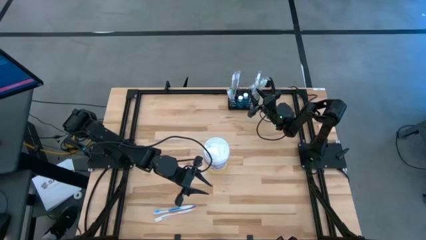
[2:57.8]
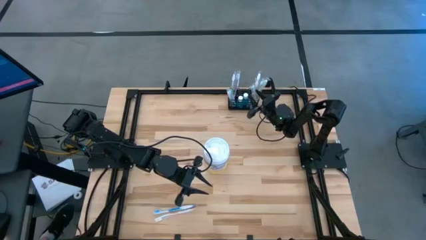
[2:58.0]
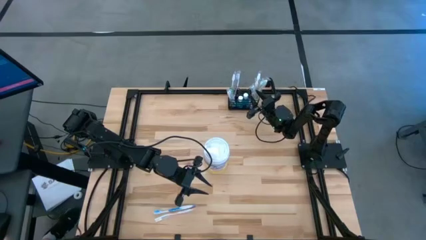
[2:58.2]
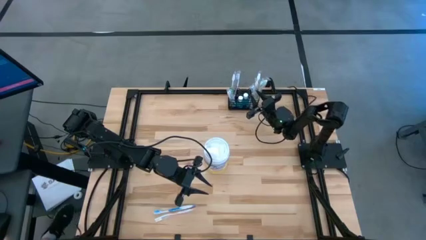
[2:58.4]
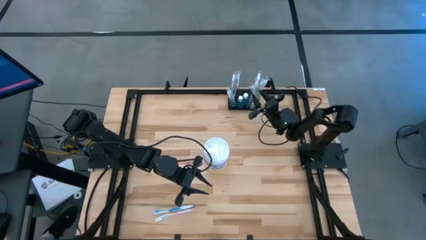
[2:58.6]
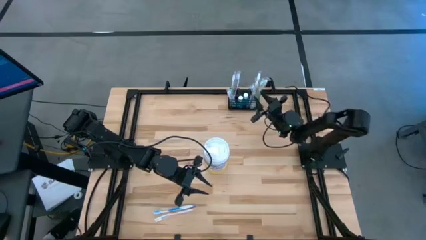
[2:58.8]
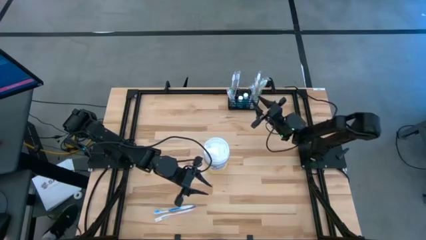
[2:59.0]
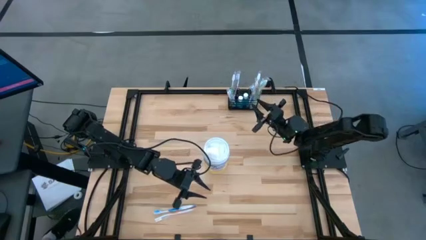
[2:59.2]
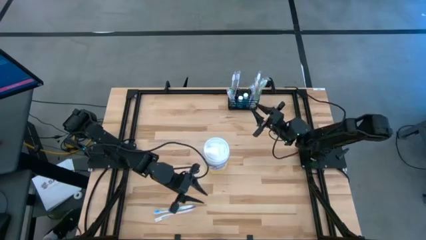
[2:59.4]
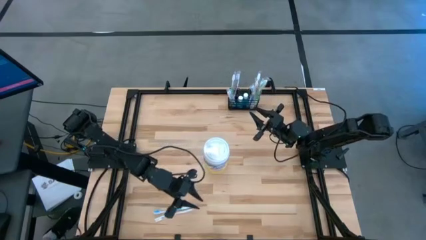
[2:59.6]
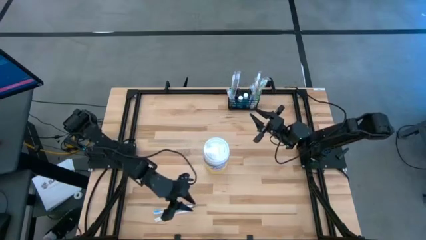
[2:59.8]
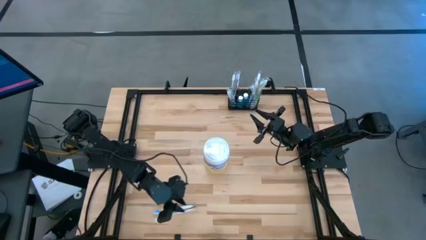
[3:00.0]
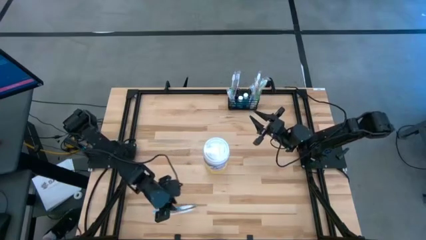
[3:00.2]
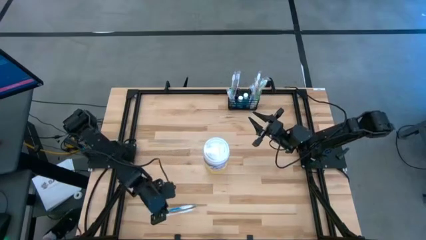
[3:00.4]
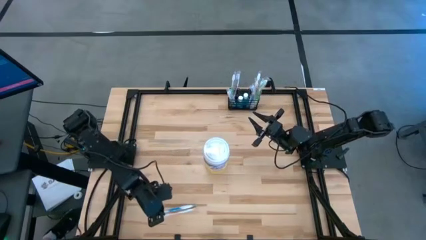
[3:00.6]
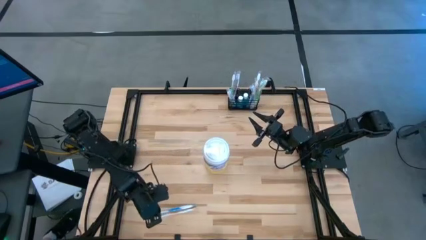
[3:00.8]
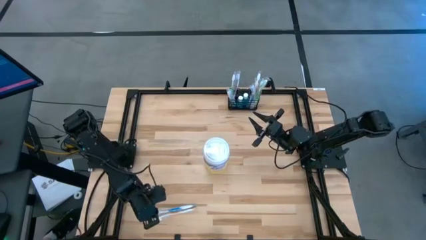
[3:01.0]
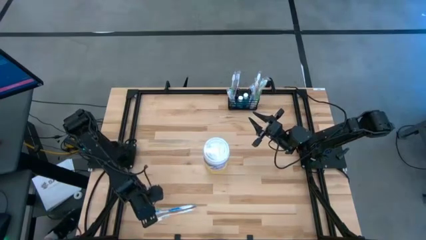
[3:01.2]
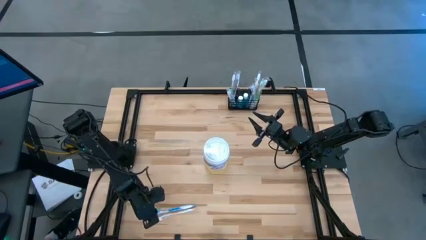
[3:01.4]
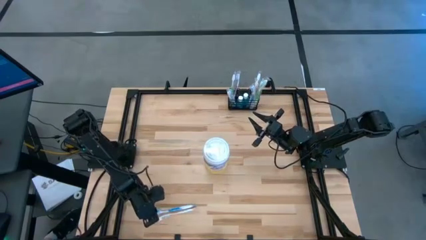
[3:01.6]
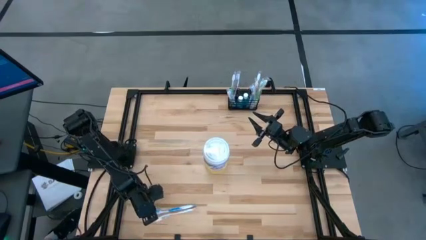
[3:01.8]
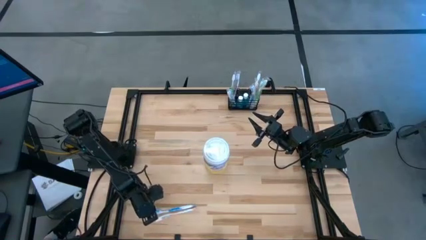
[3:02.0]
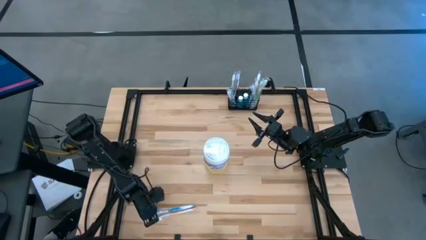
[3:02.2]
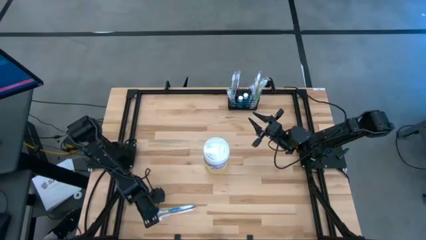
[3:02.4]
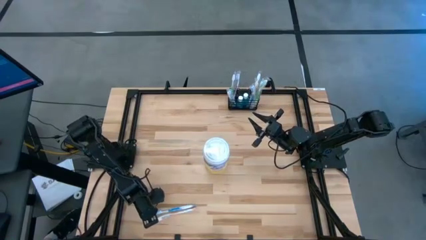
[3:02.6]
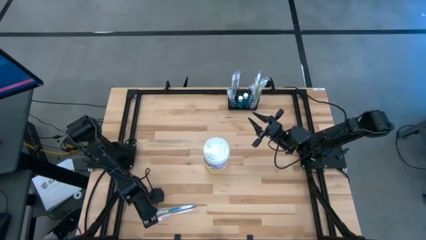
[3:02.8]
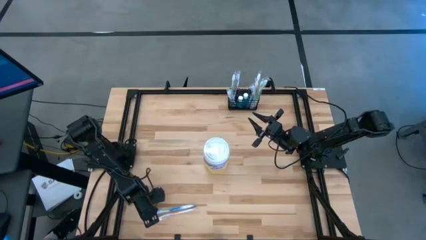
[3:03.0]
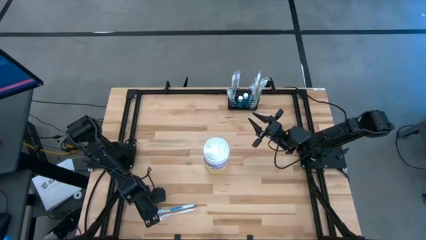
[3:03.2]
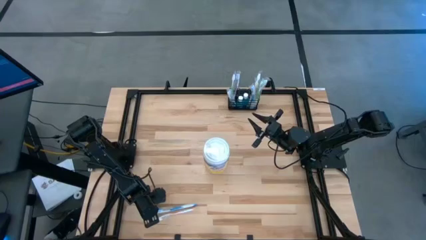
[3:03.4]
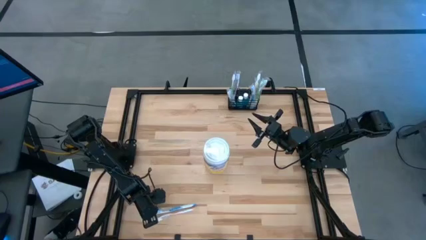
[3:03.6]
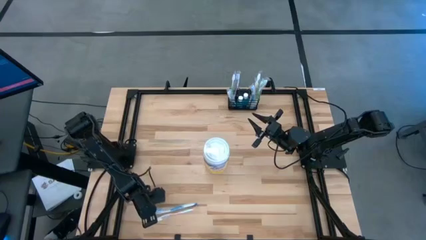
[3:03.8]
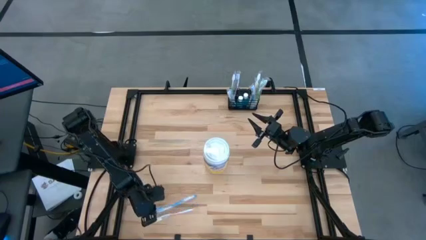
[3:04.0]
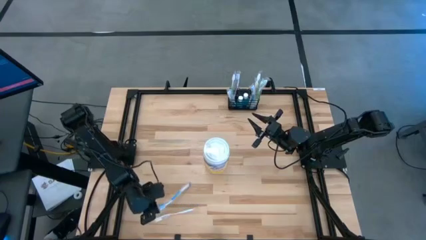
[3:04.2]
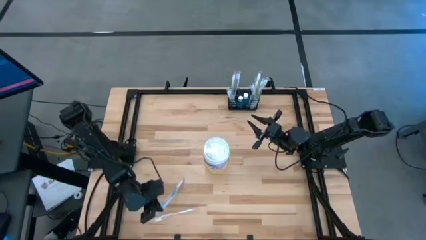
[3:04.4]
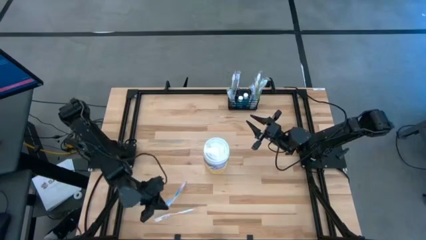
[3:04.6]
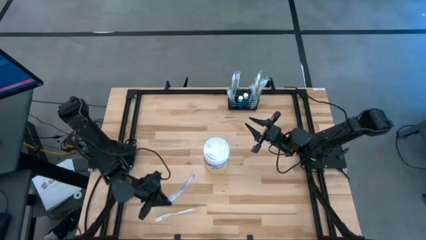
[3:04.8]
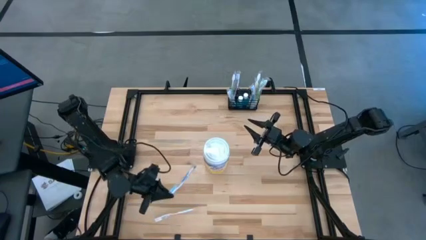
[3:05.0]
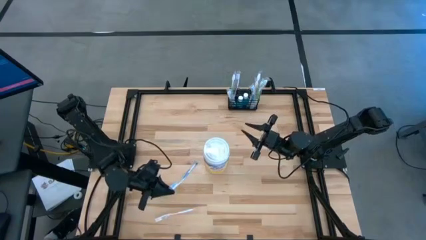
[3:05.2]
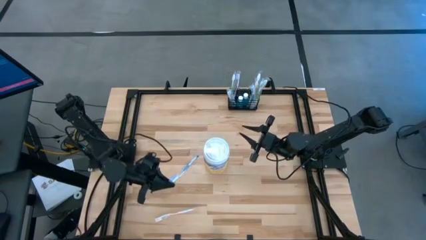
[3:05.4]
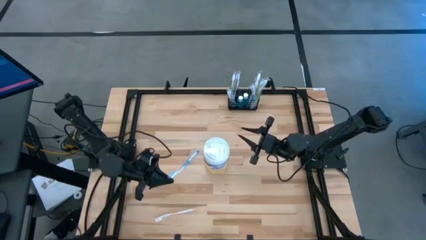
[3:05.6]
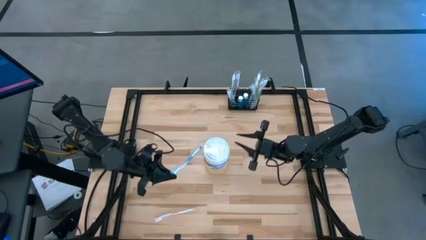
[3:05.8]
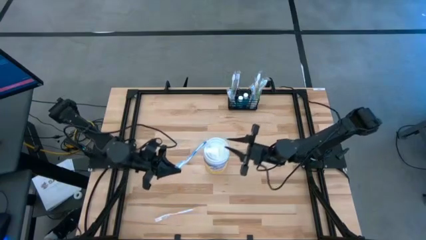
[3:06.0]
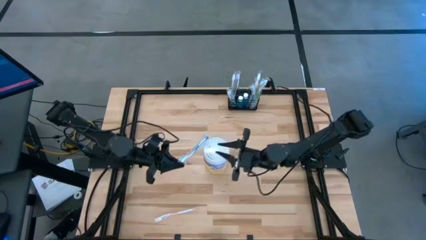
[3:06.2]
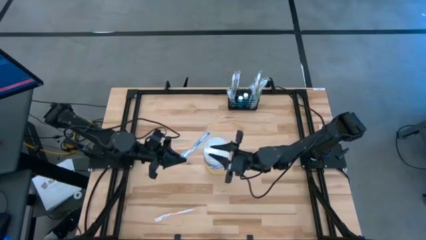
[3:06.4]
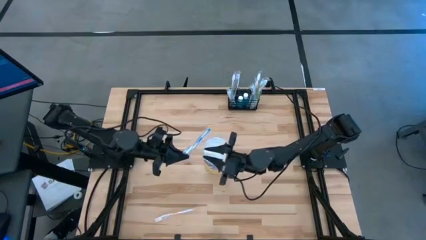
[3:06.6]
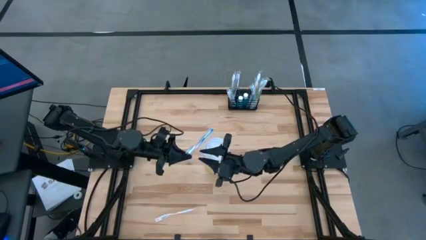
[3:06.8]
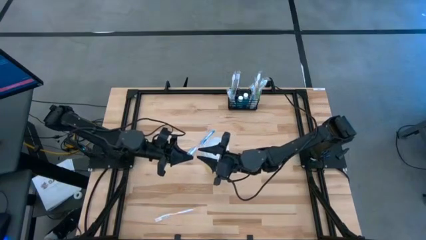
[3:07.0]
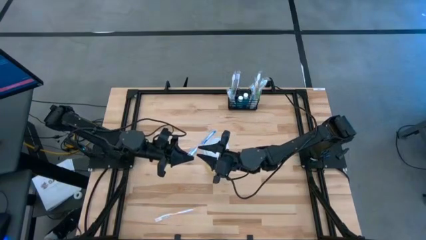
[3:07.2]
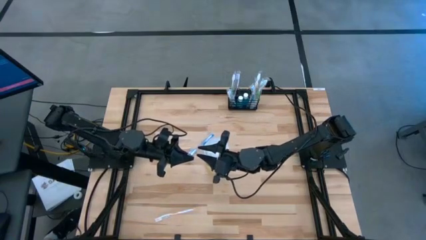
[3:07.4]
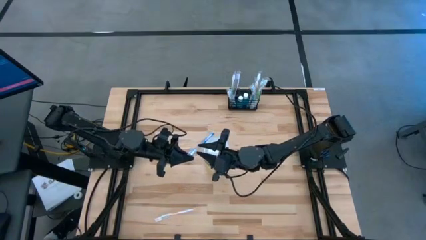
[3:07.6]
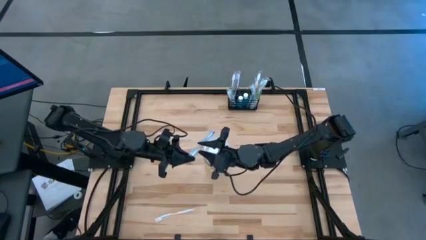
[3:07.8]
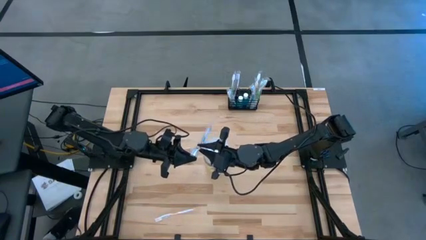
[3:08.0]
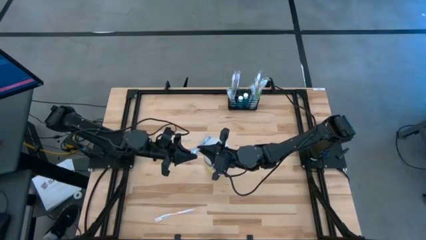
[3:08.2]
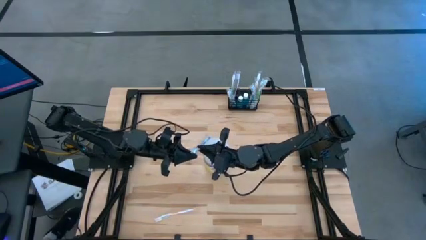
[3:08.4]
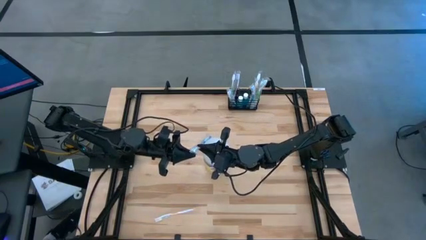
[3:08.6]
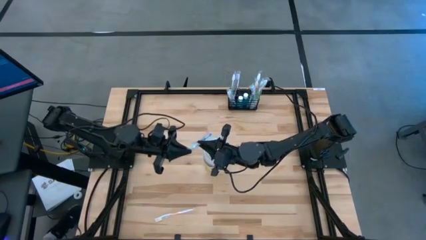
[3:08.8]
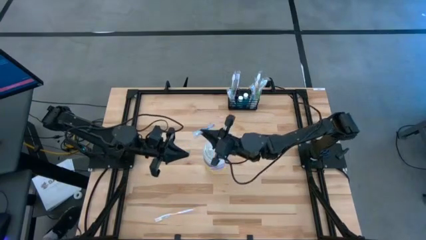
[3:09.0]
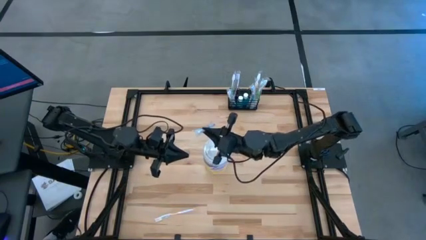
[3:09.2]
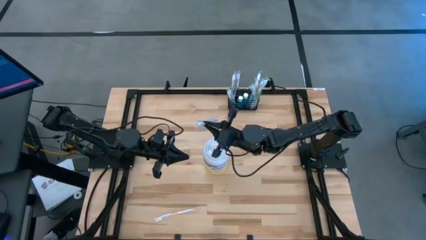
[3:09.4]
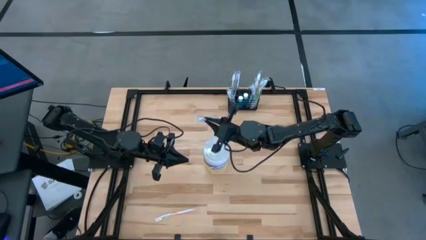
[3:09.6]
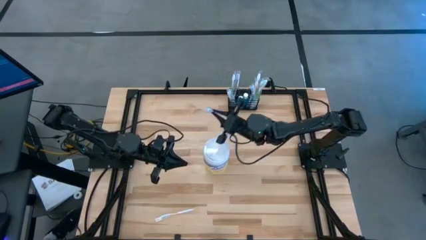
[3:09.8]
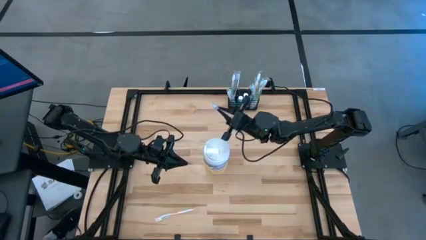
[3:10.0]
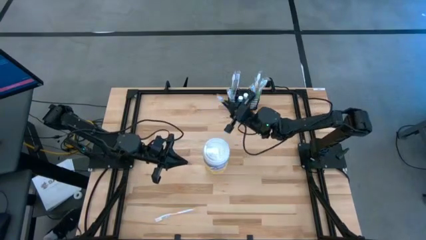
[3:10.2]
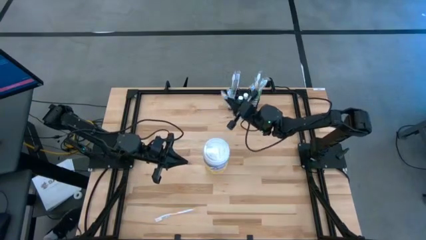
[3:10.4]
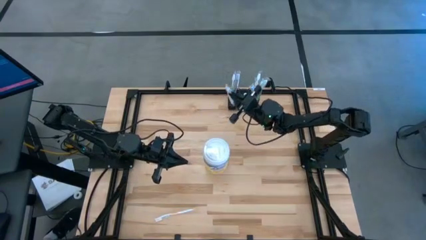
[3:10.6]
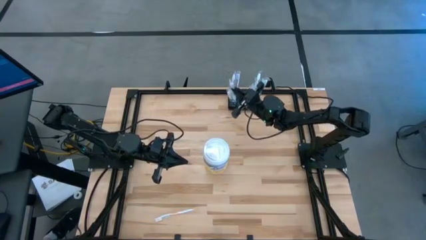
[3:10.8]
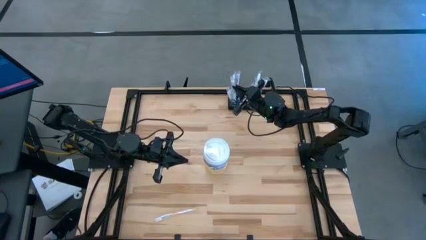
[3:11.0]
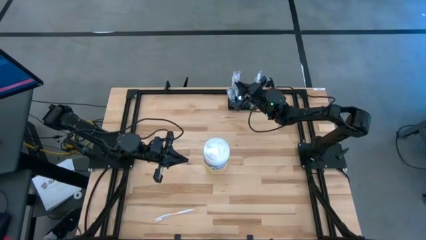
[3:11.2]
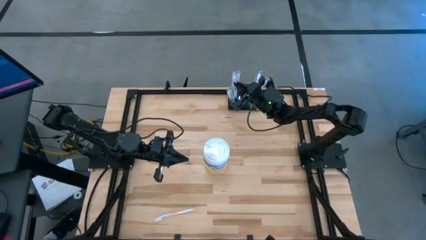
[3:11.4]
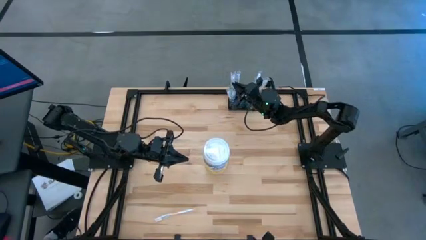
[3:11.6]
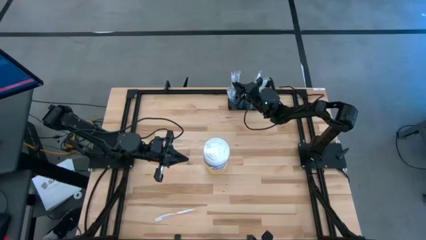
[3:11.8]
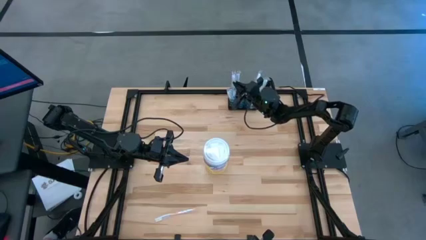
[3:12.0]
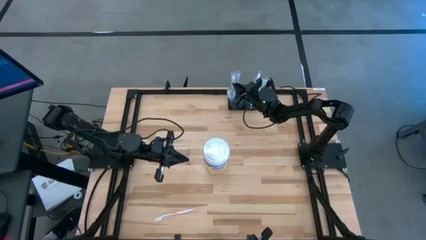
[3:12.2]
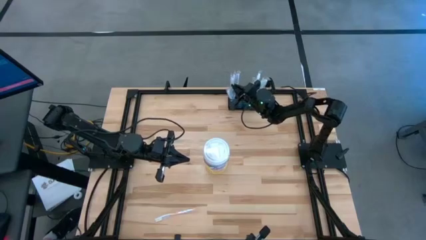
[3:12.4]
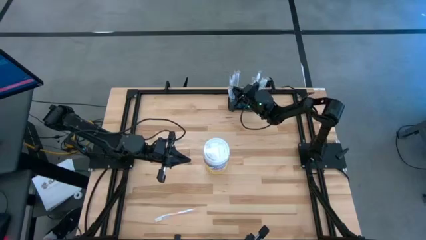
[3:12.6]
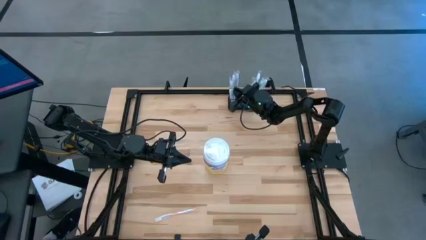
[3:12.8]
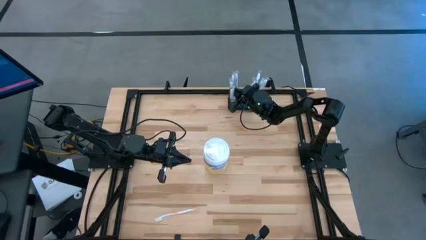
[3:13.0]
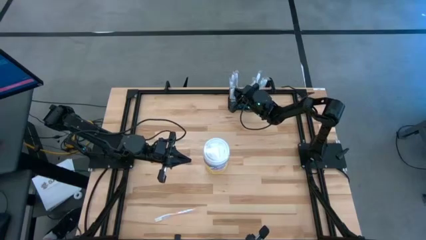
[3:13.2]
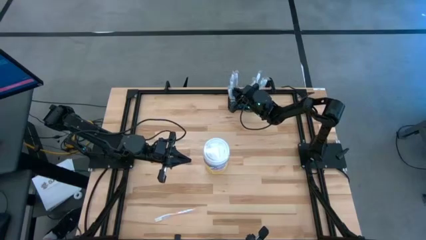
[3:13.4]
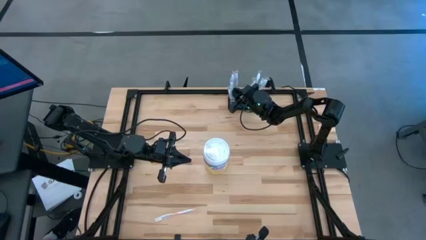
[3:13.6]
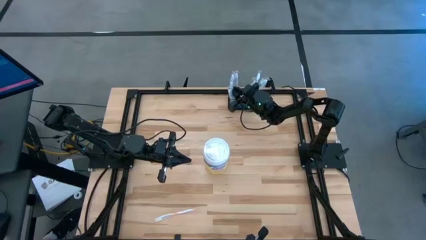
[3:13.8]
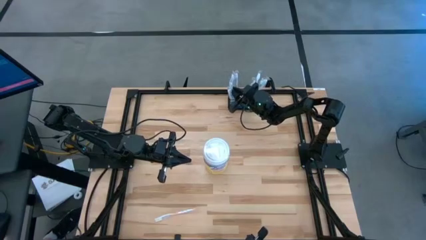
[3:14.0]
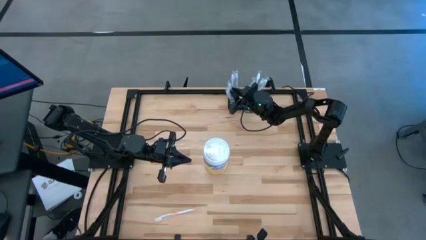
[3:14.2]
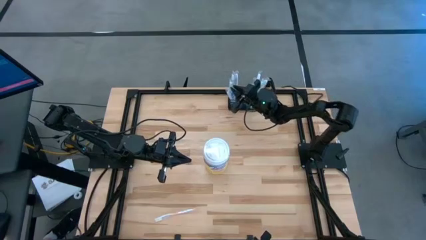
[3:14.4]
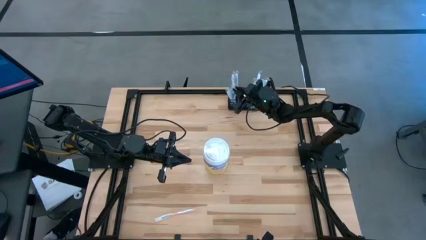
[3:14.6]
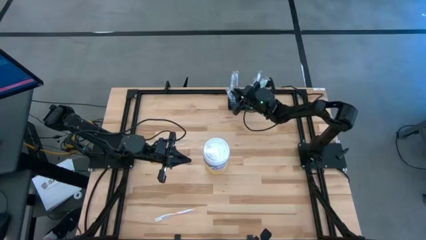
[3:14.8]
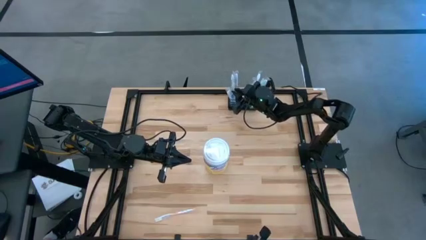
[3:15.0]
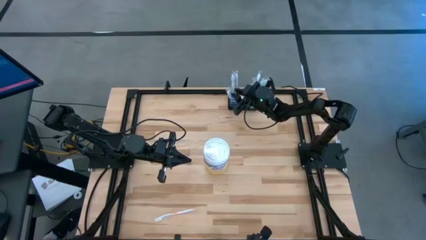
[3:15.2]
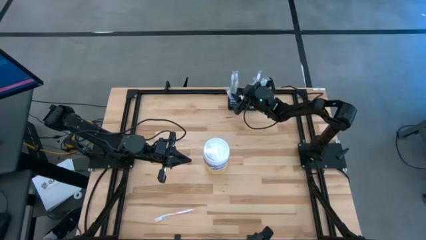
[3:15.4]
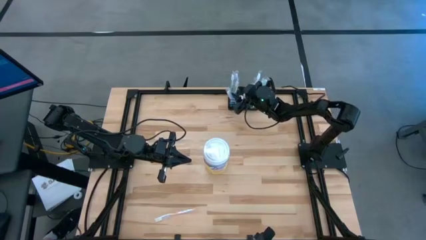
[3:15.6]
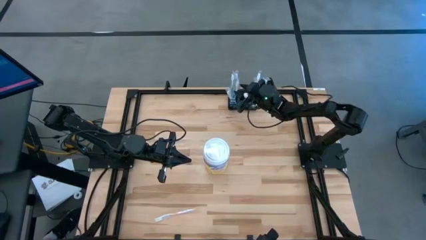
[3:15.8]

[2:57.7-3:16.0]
Task: Pick & Place toothbrushing station
Put the blue toothbrush into the black mesh organizer
